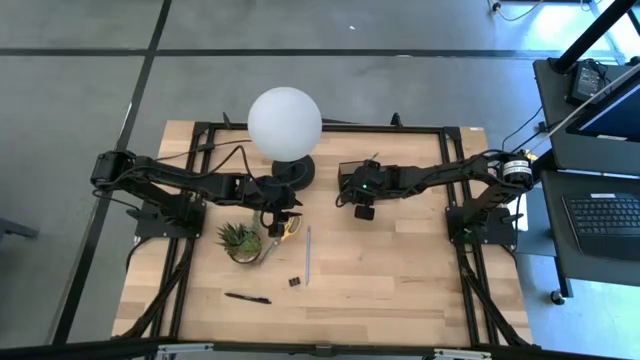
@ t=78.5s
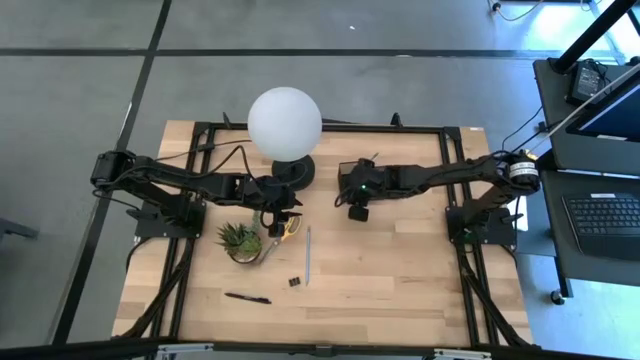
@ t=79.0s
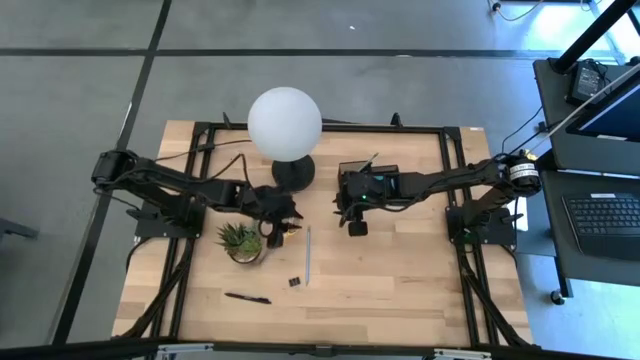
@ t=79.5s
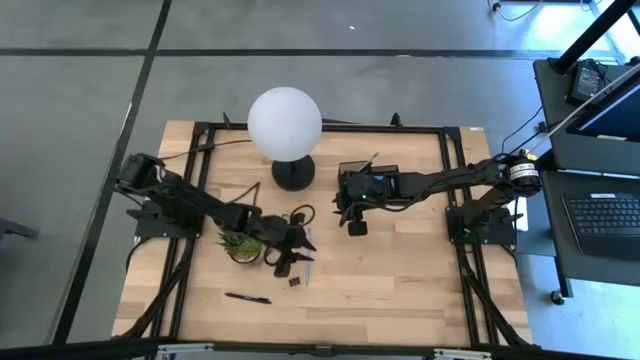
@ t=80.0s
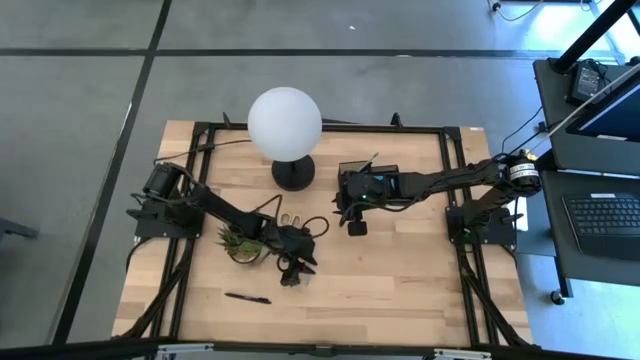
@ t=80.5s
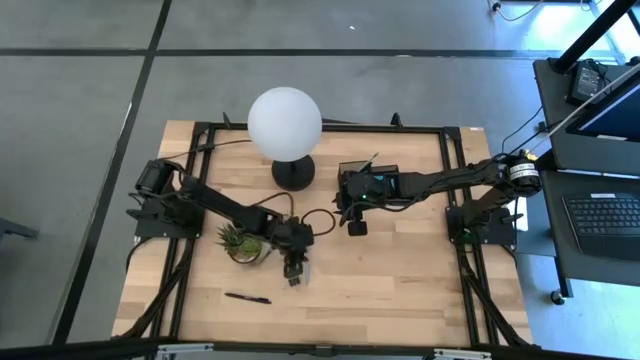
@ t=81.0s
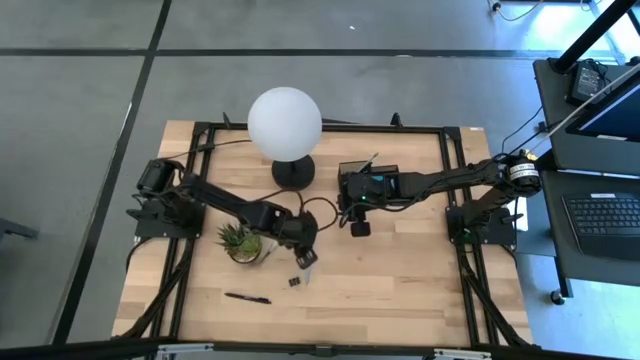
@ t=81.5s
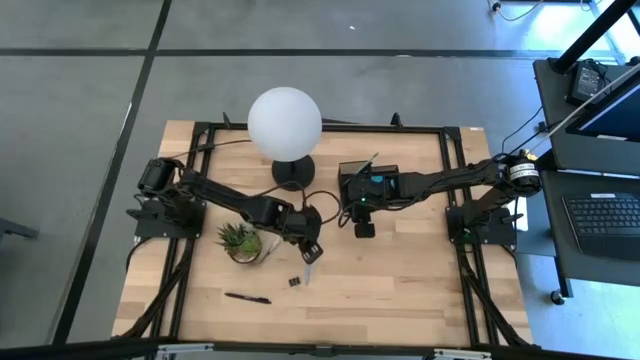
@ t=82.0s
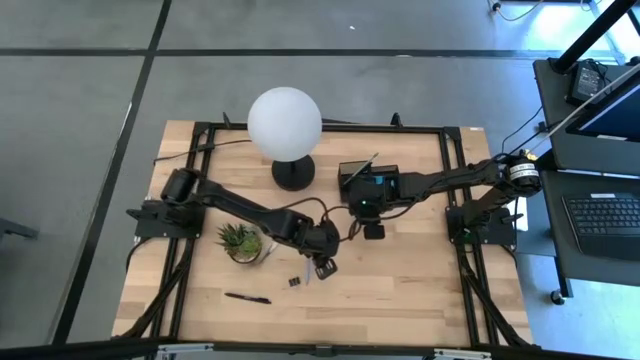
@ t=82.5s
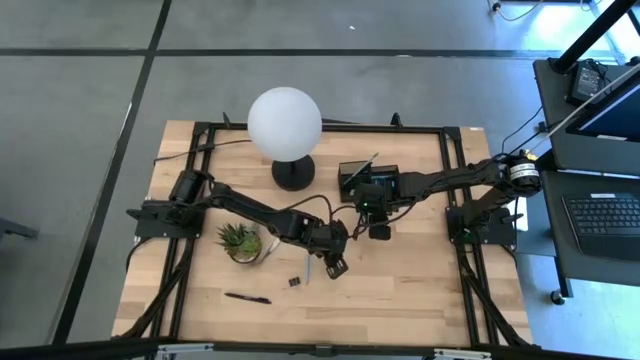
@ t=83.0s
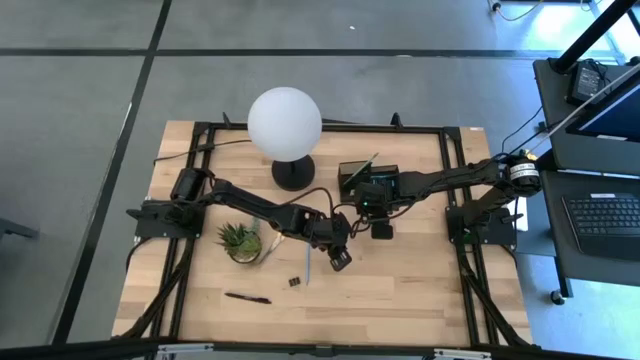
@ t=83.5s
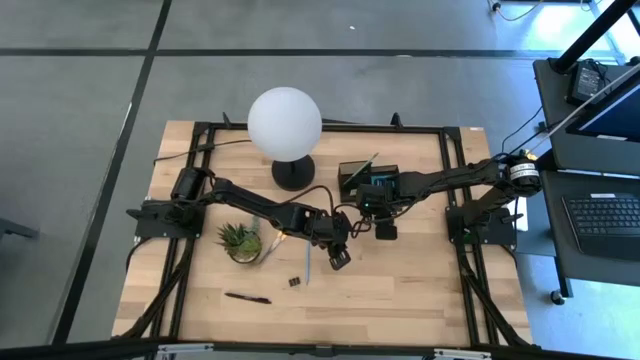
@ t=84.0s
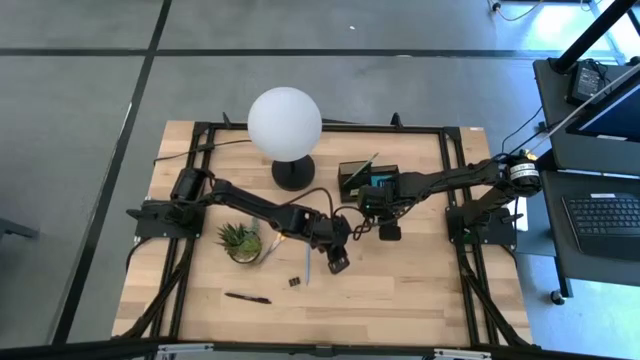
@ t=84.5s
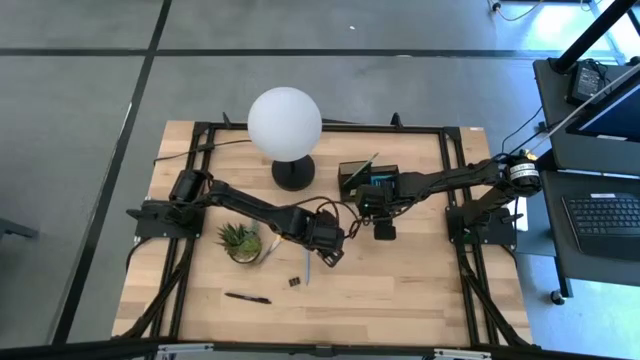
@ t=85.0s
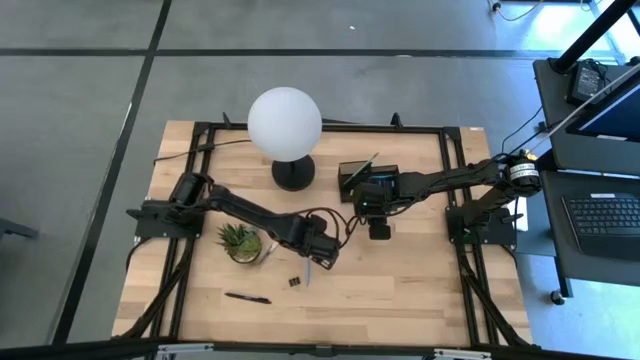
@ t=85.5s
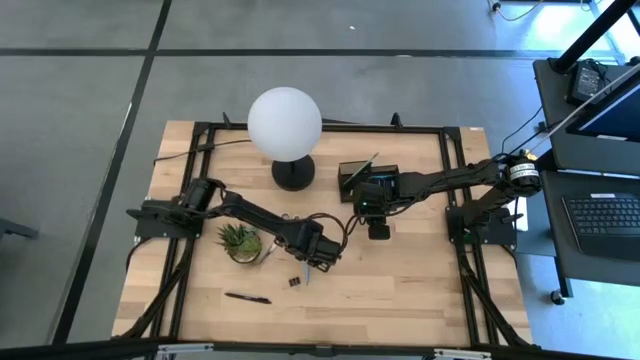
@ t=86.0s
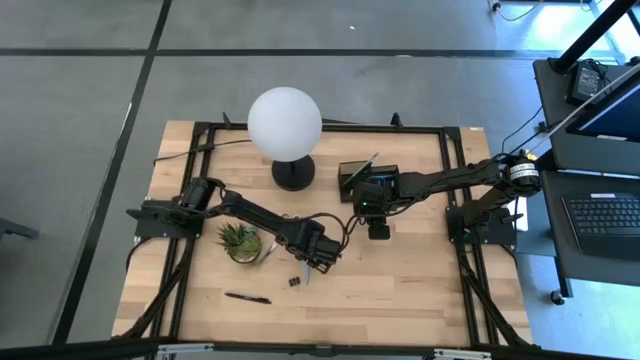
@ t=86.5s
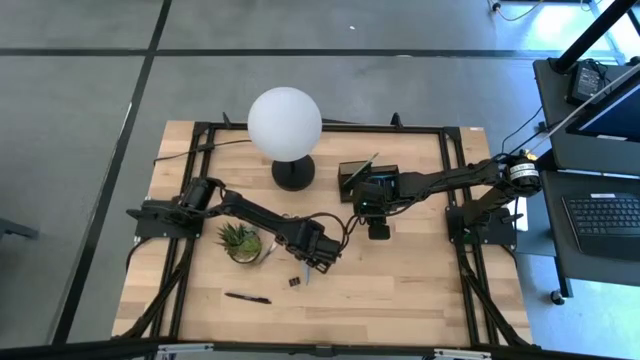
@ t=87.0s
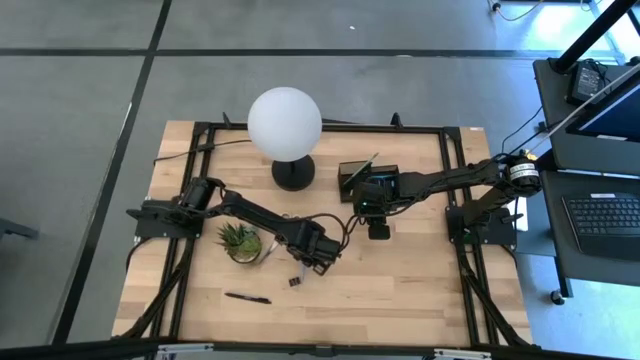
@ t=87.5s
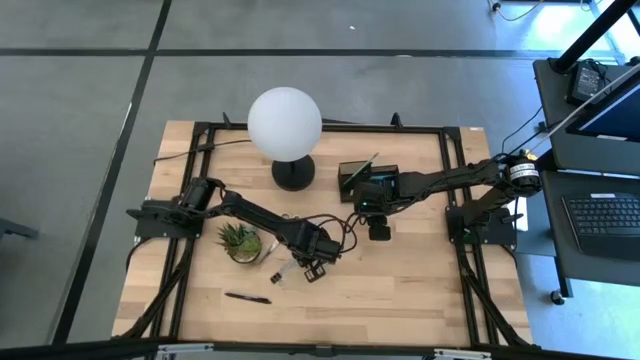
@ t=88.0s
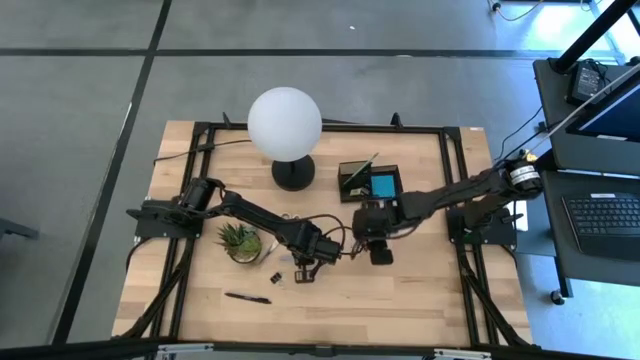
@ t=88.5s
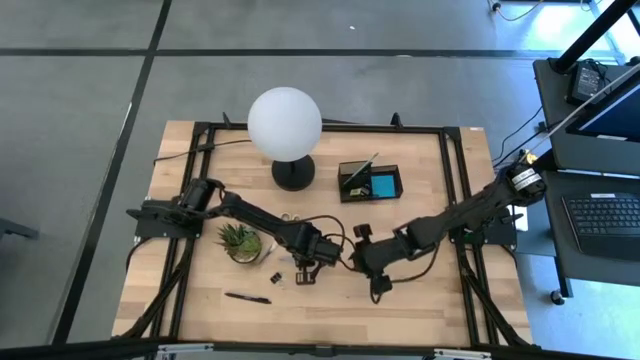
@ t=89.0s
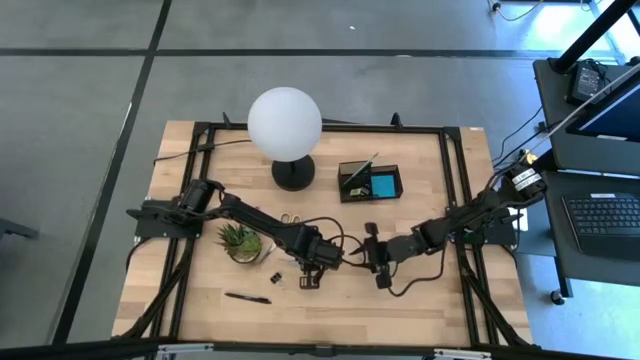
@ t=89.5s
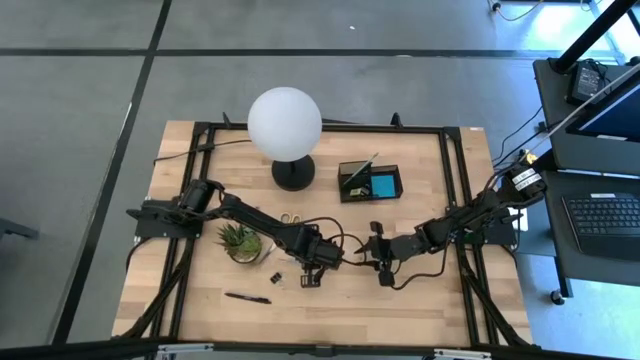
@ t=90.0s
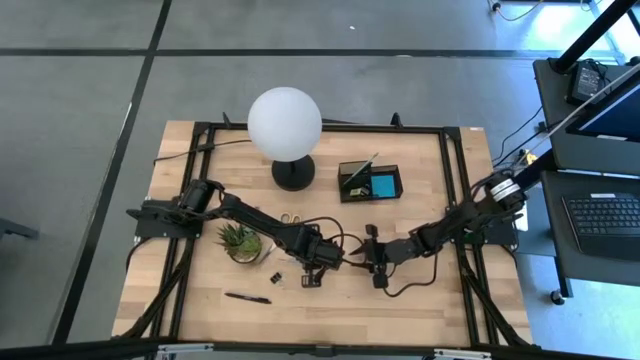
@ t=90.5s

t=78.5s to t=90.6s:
Task: Pick and place office supplies into organizer
Put the blue pencil into the desk organizer

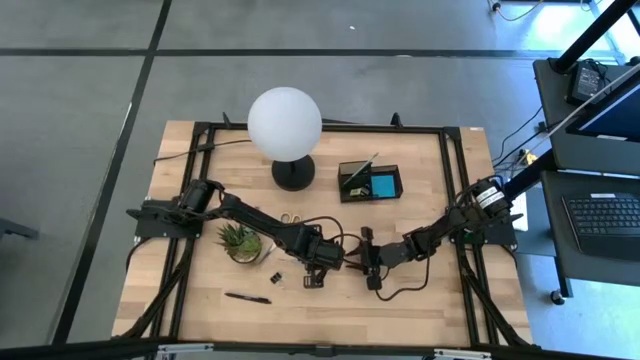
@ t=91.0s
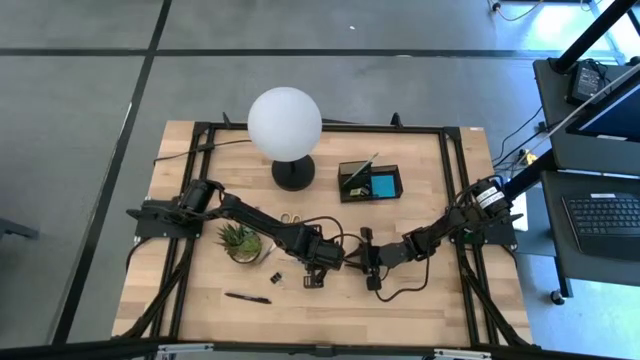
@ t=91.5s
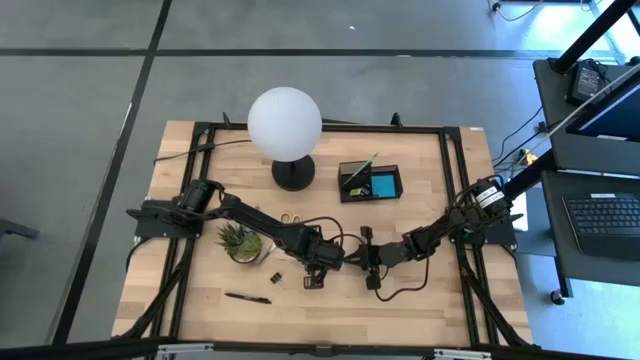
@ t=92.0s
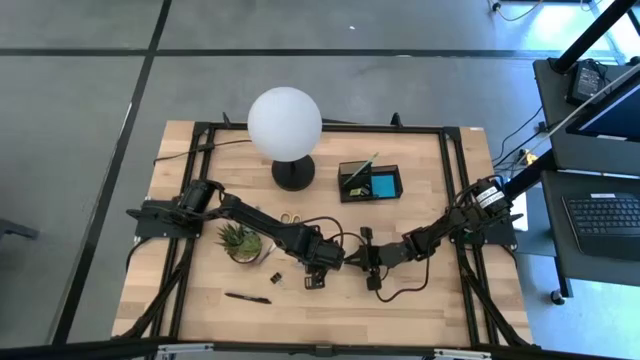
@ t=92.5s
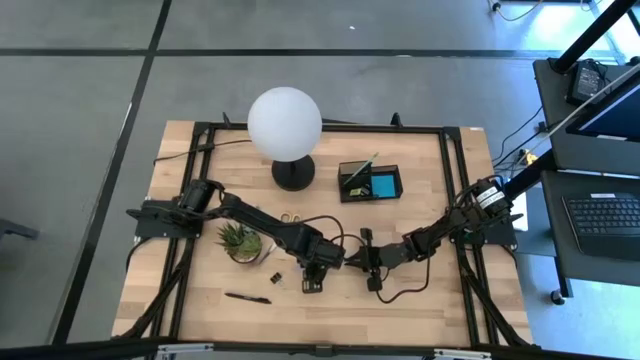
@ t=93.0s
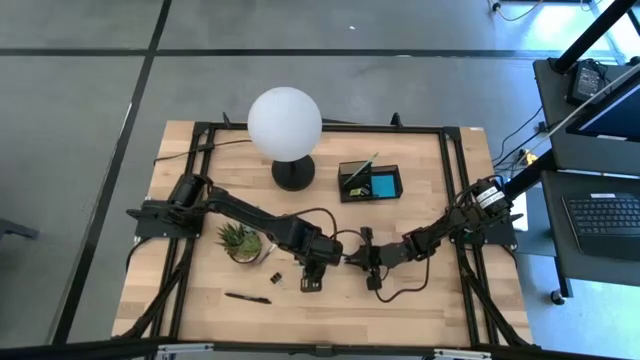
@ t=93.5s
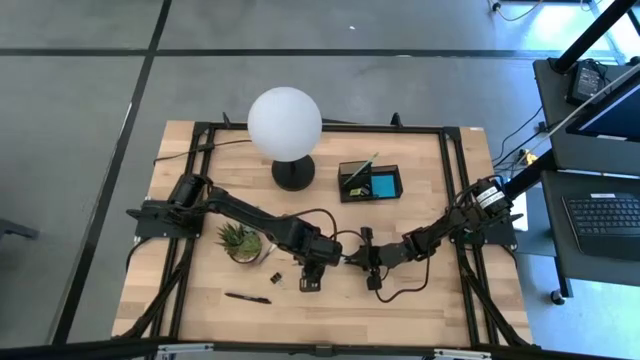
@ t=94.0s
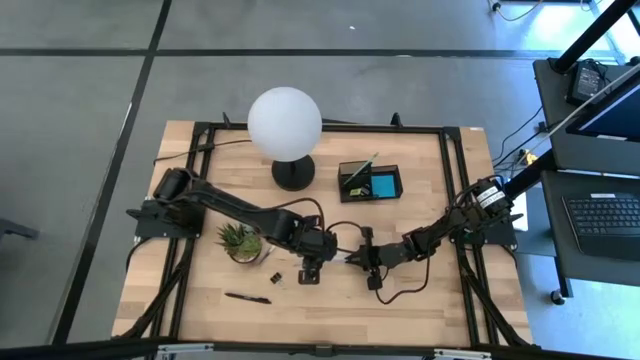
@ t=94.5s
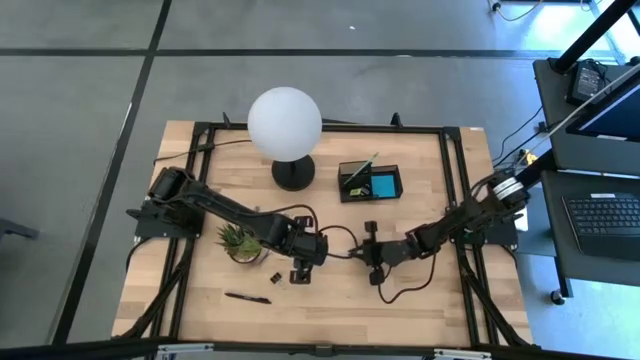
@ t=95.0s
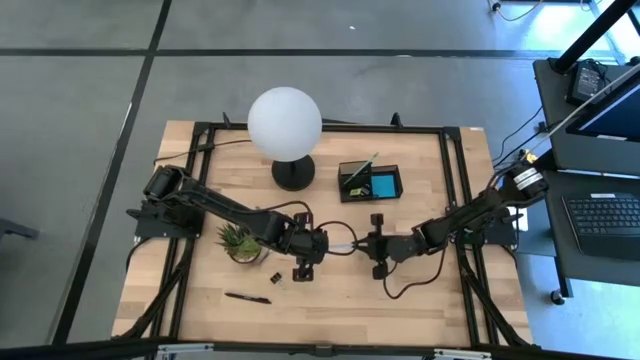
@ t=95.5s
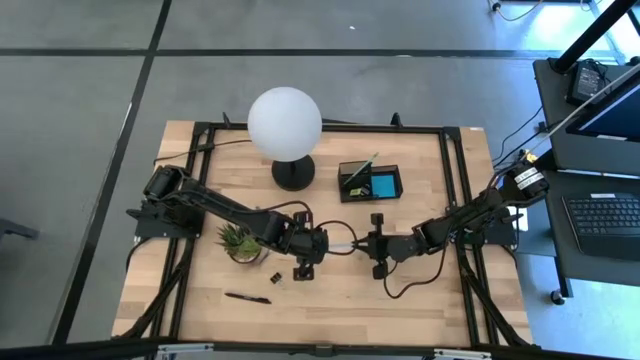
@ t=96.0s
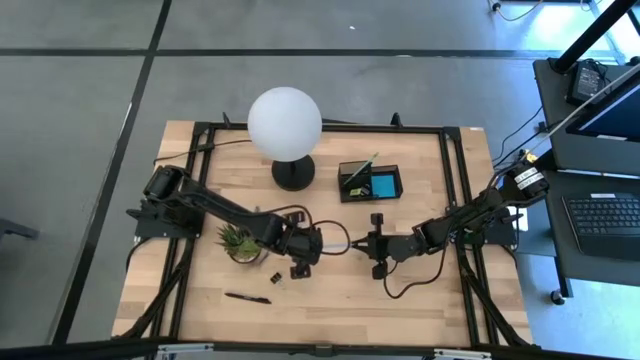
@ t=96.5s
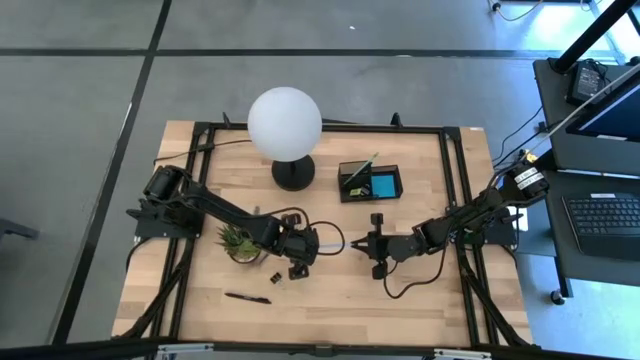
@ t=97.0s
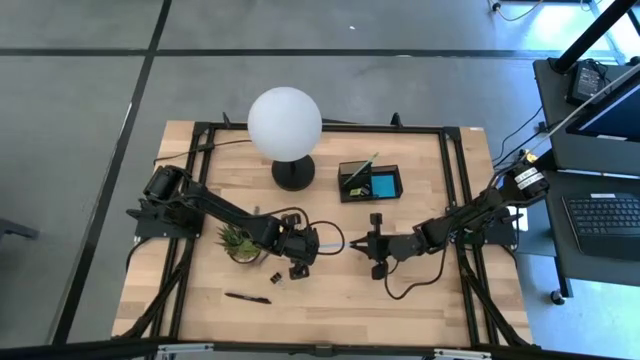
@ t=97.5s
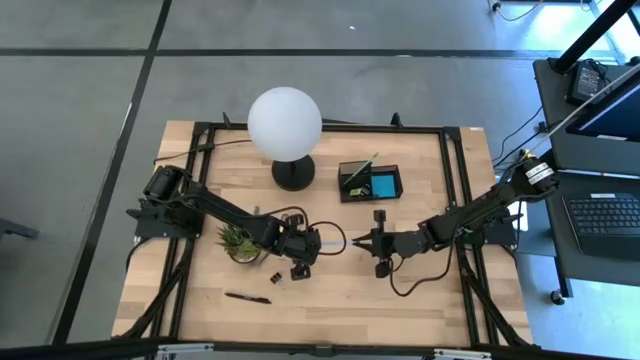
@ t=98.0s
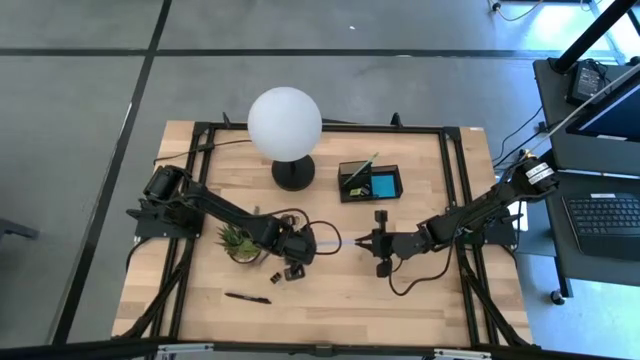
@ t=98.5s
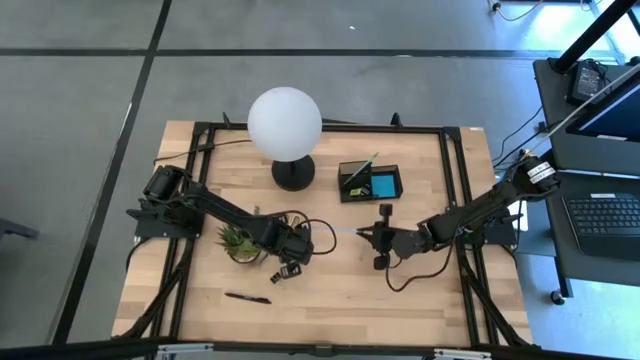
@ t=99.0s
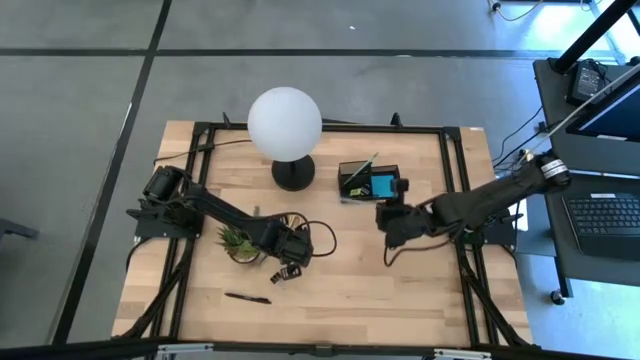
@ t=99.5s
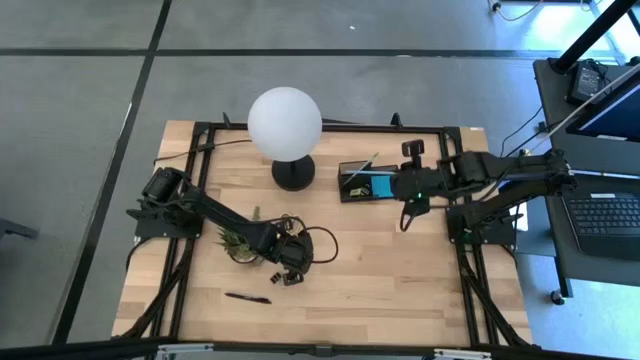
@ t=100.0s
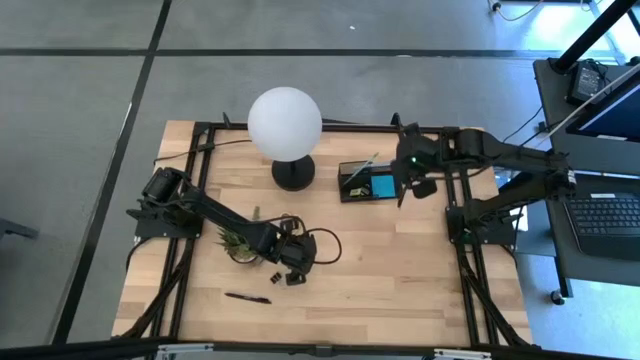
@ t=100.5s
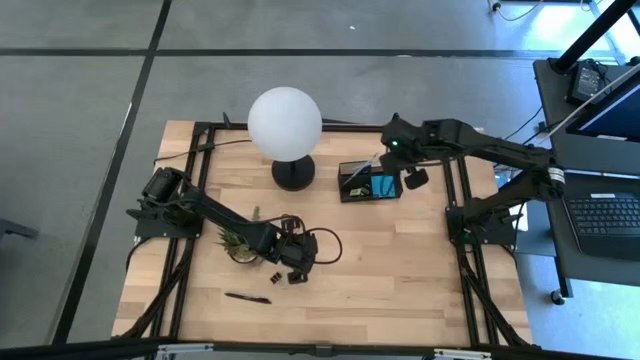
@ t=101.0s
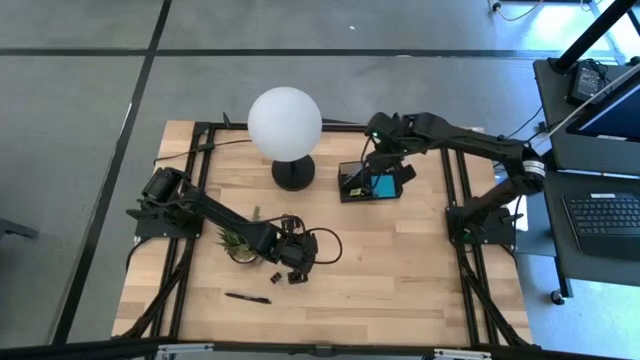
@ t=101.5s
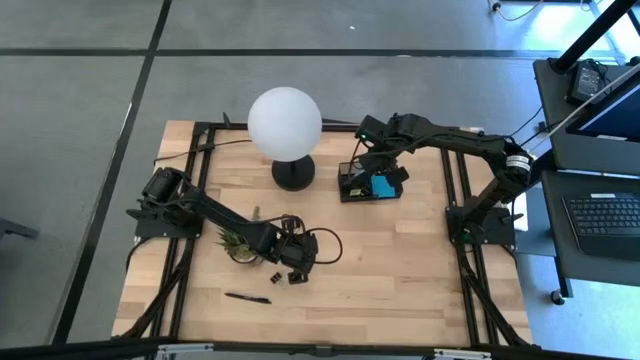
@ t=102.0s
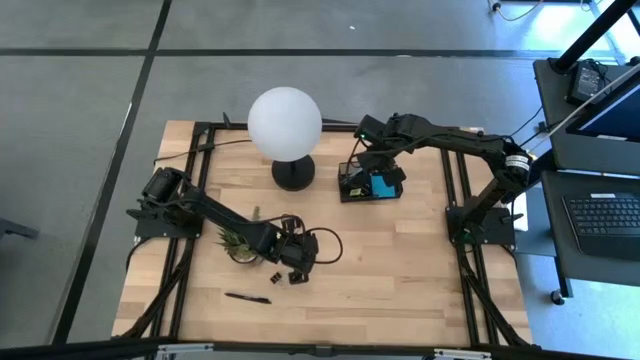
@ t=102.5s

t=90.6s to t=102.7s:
Put the blue pencil into the desk organizer
